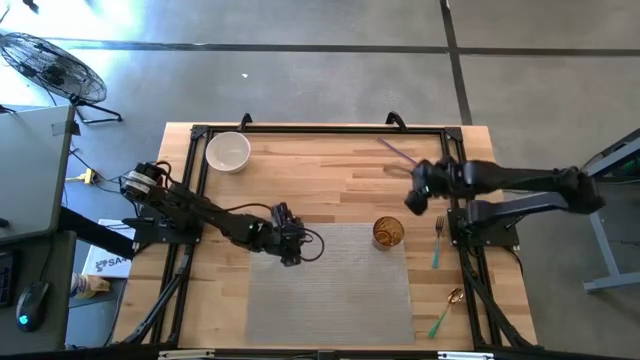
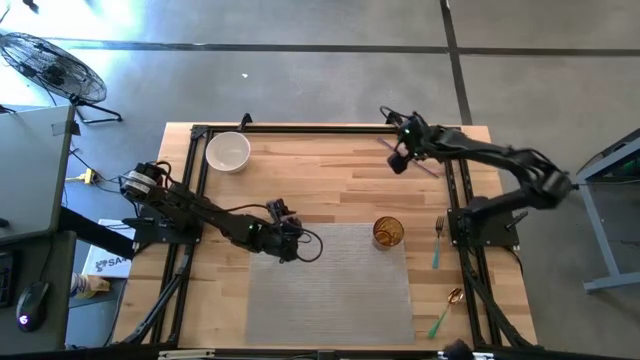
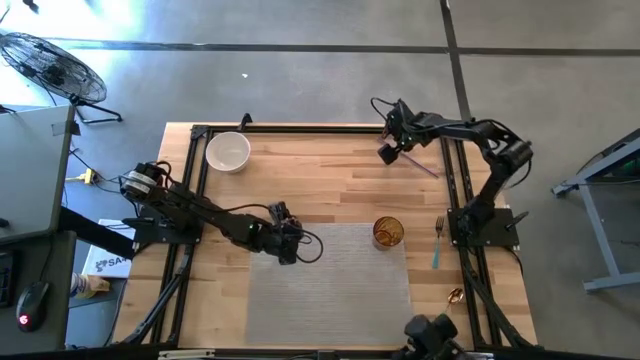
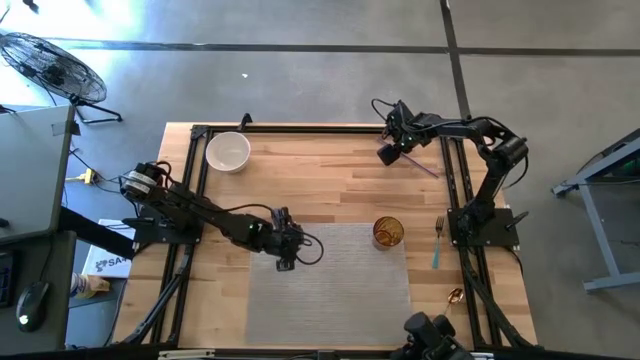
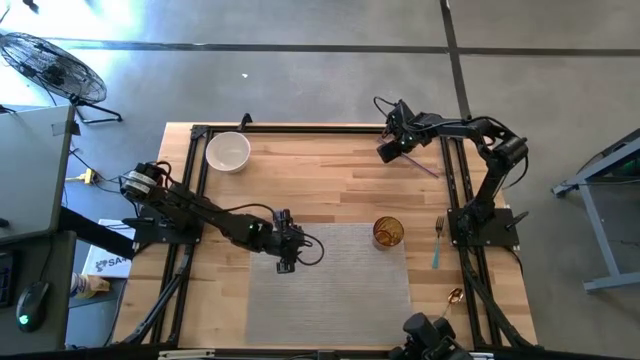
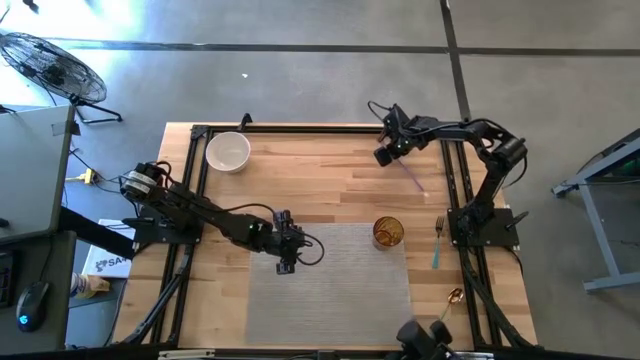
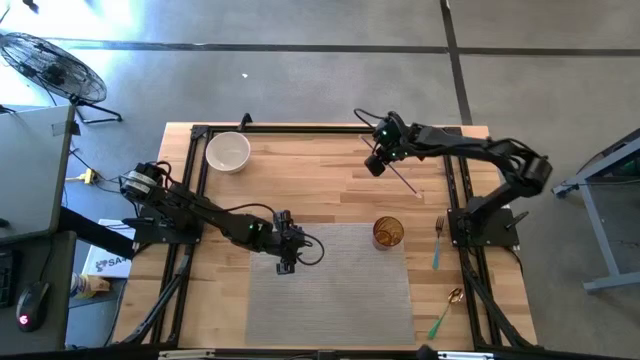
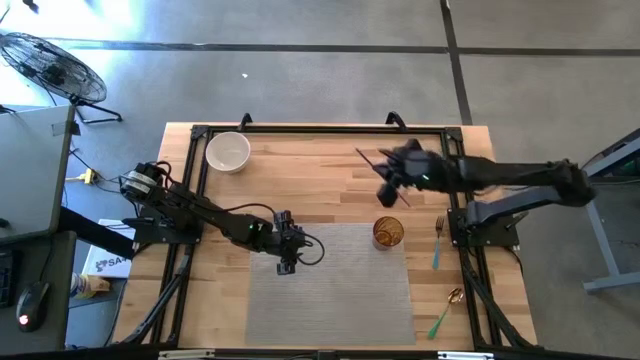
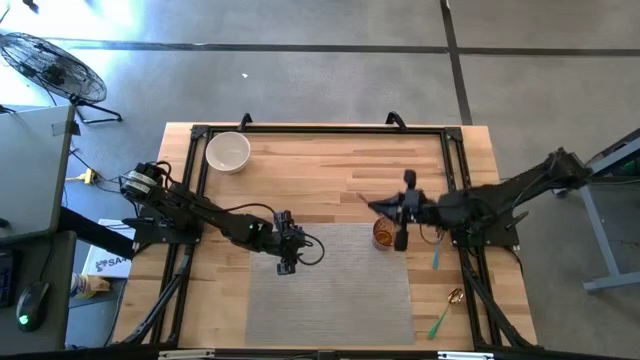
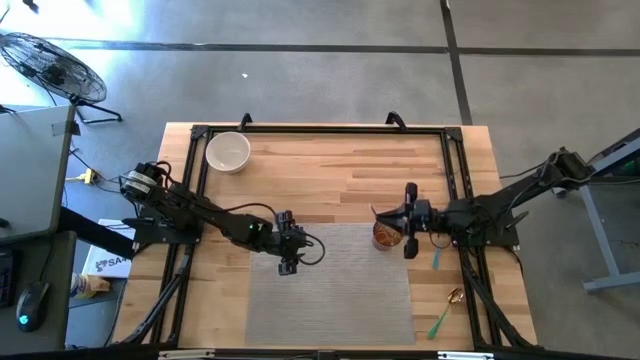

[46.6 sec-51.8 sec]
Task: Pick & Place Utensil
Put the blue straw into the brown cup

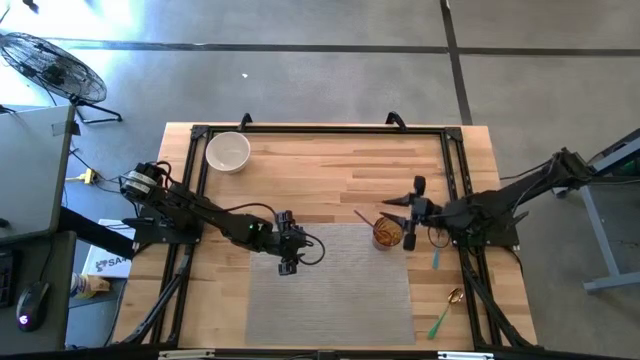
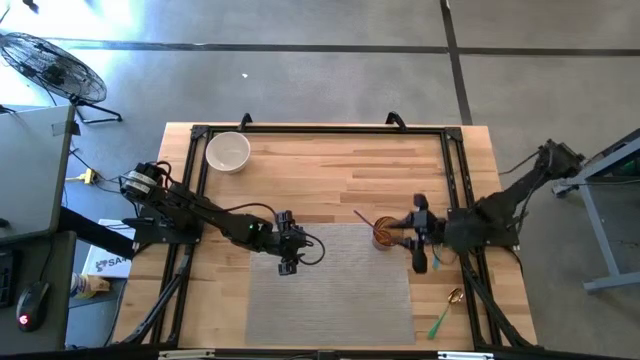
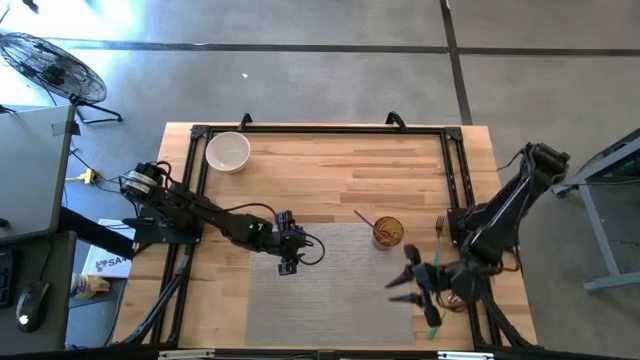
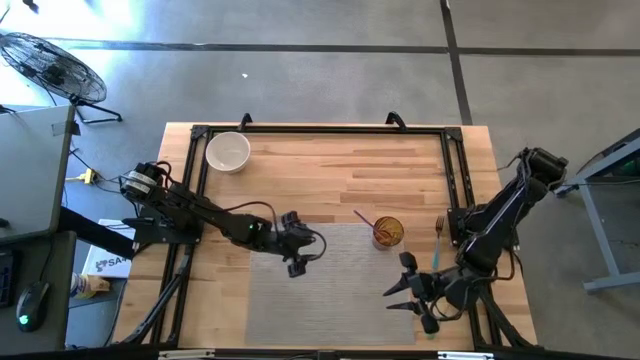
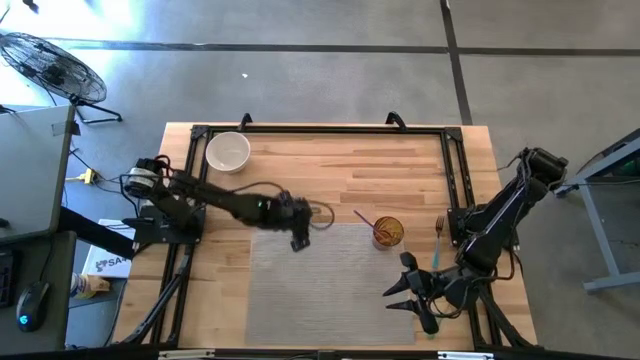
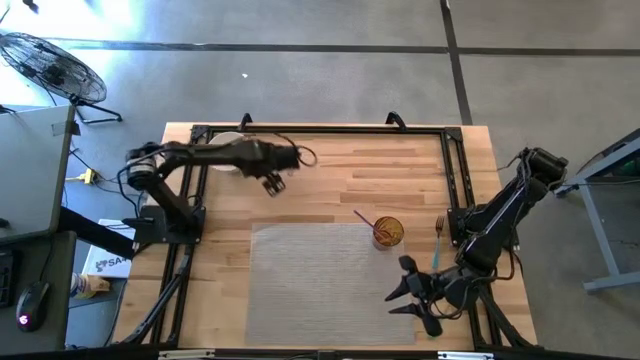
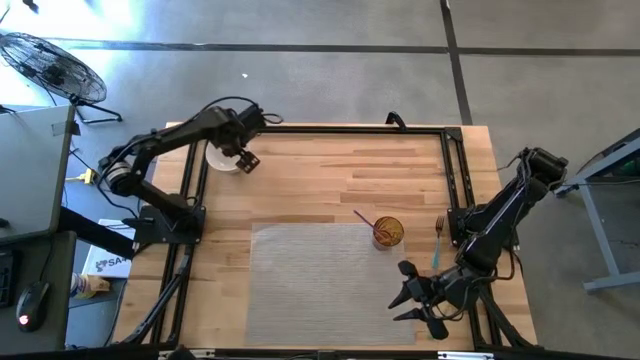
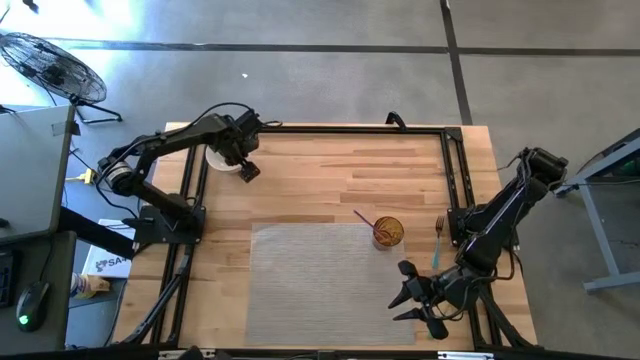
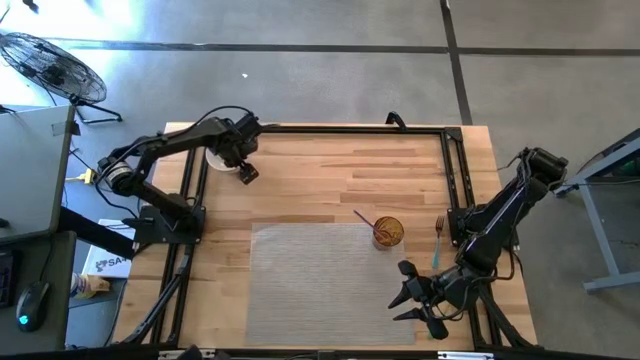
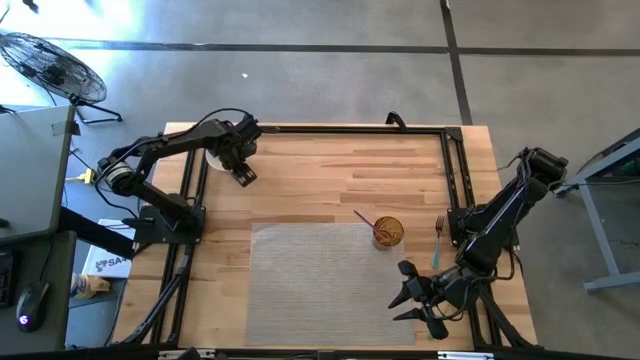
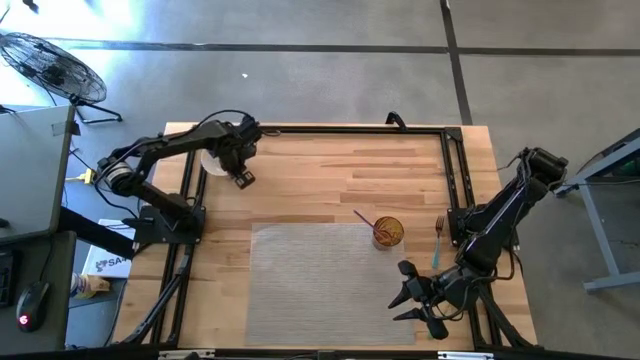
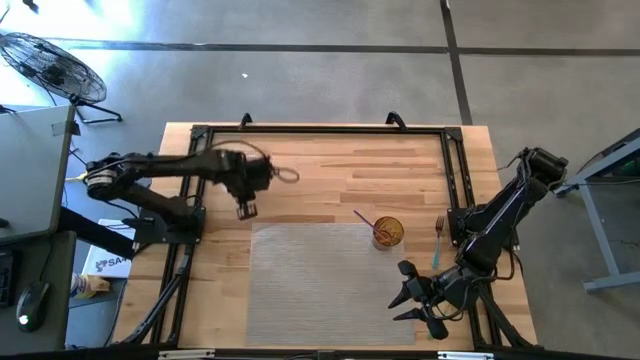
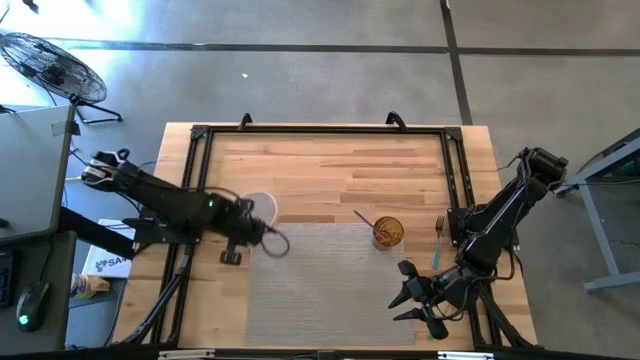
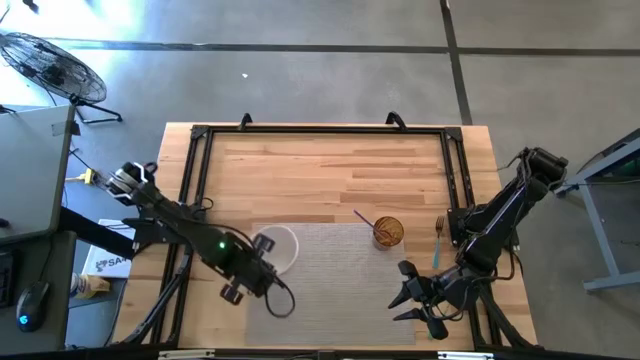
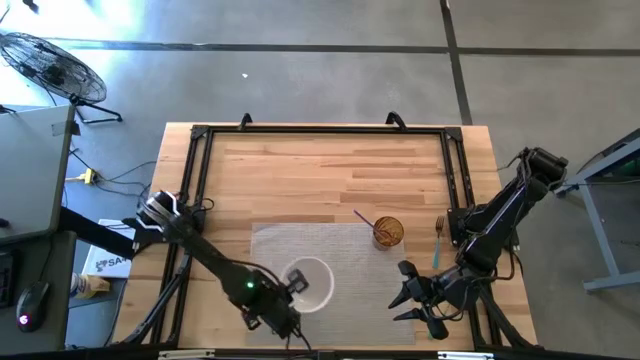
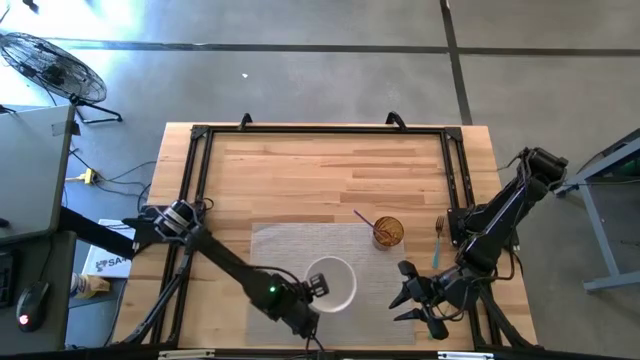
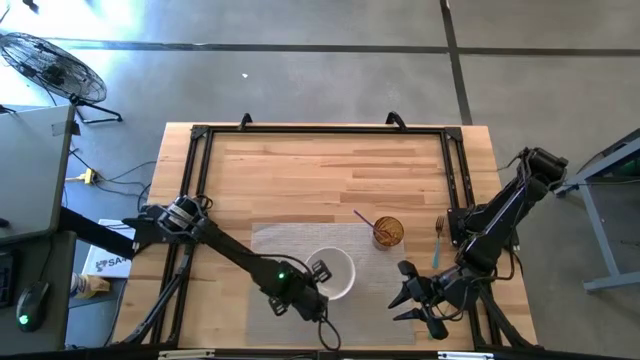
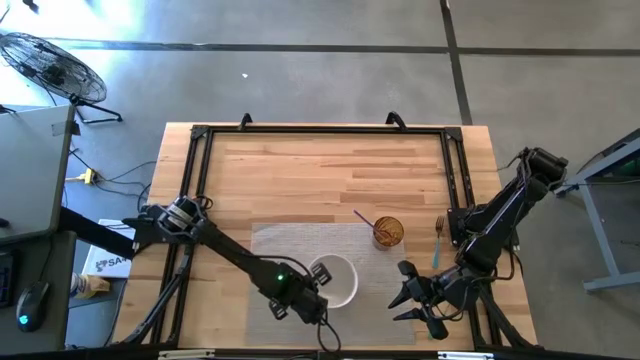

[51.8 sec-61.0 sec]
Put the white bowl on the gray mat to the bottom left of the brown cup

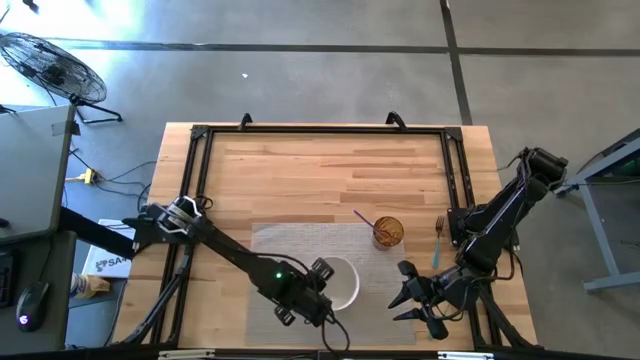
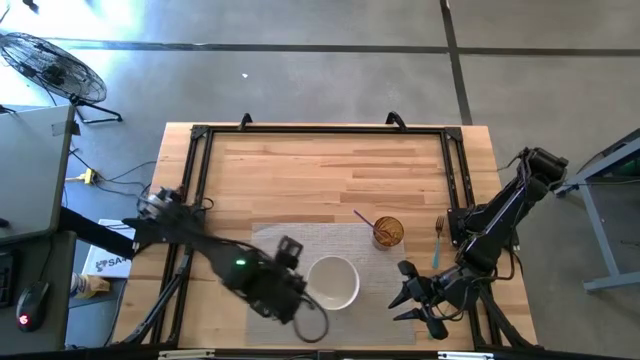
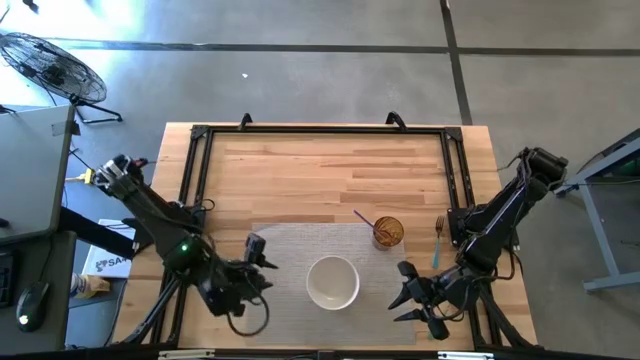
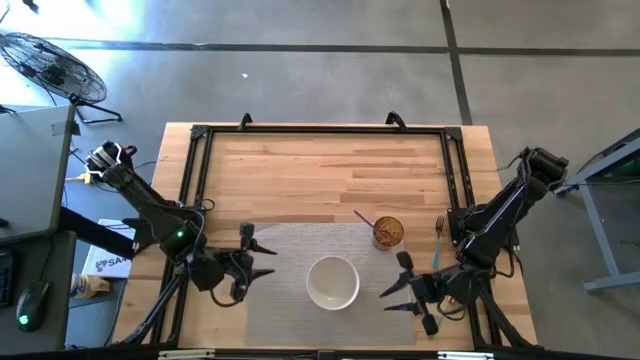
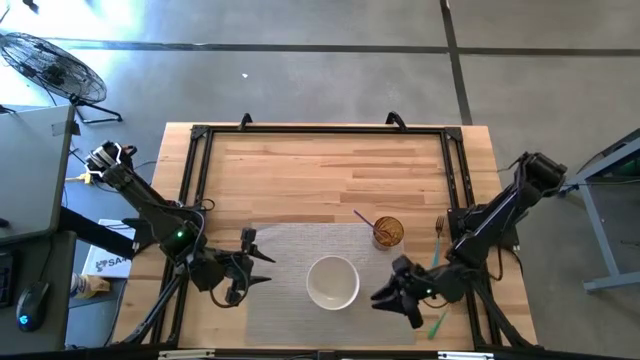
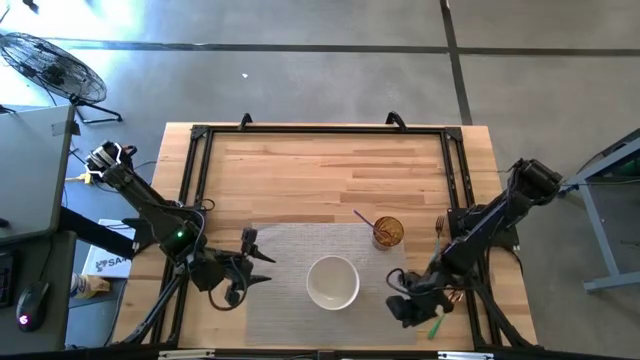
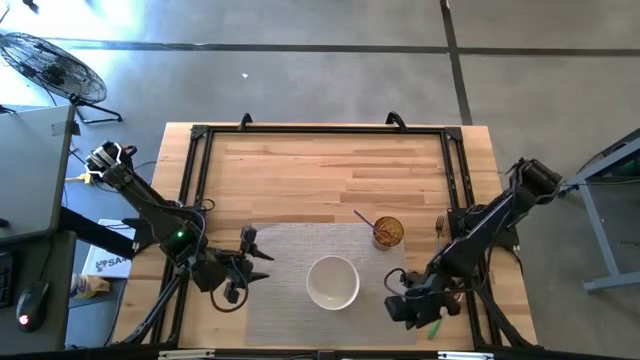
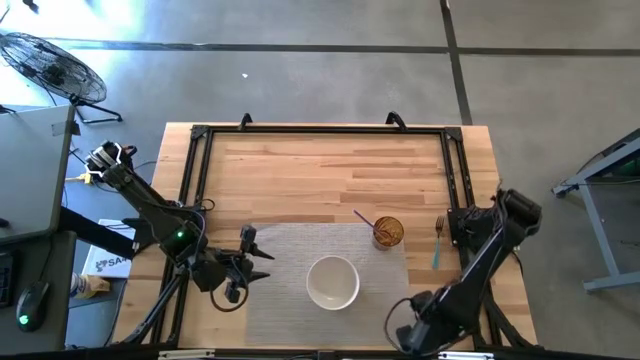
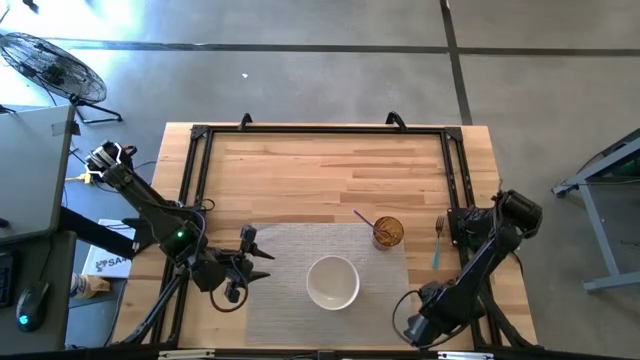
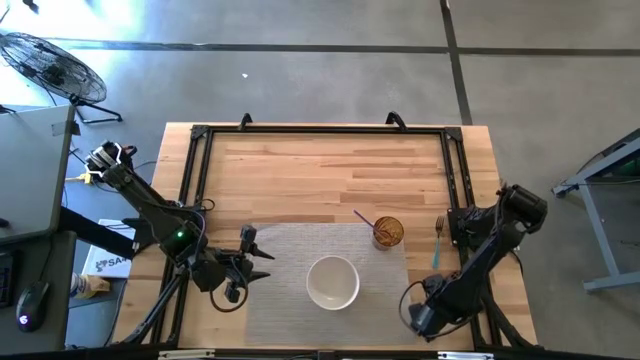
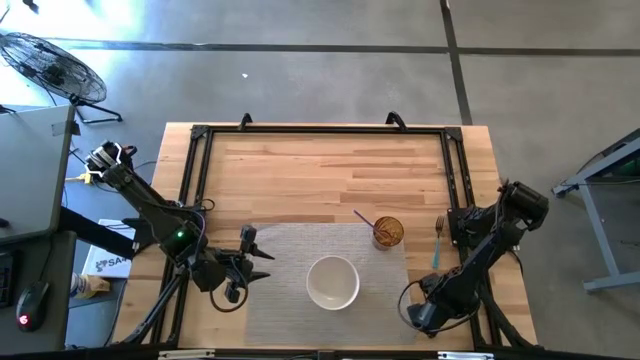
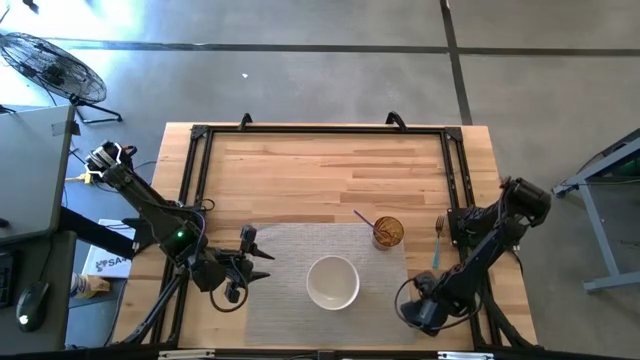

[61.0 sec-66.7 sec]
Put the green spoon into the white bowl

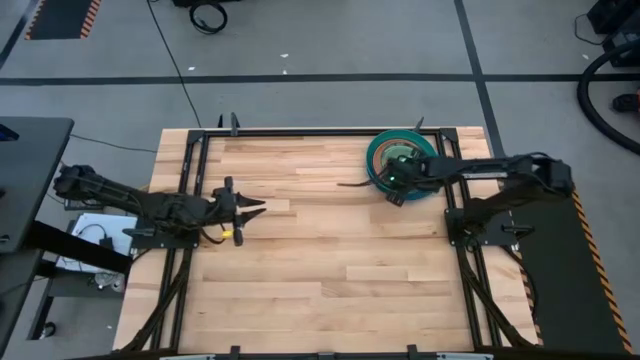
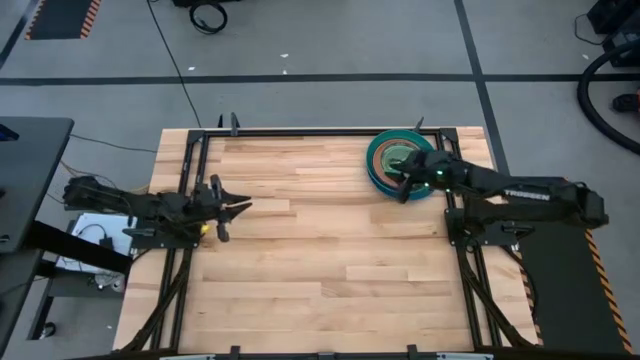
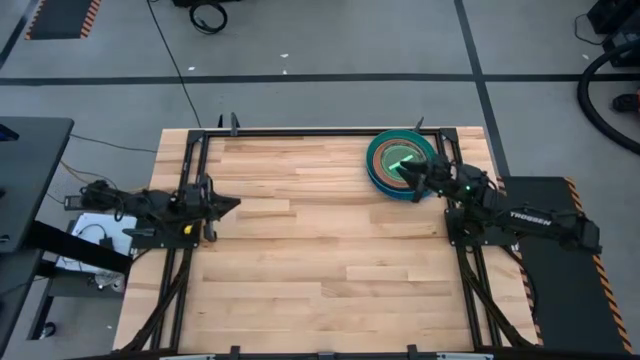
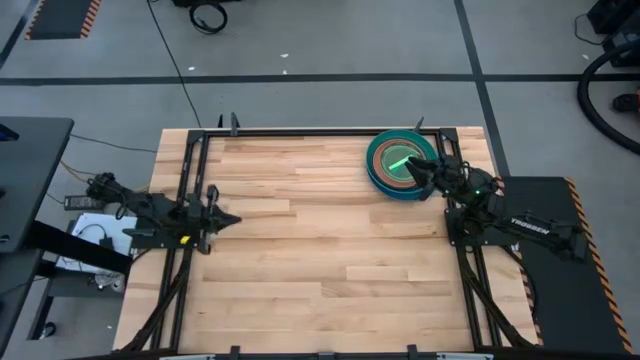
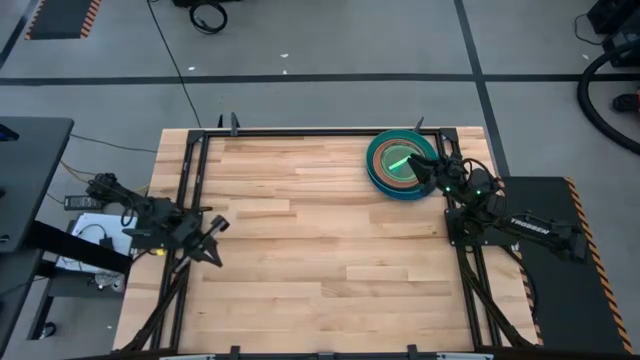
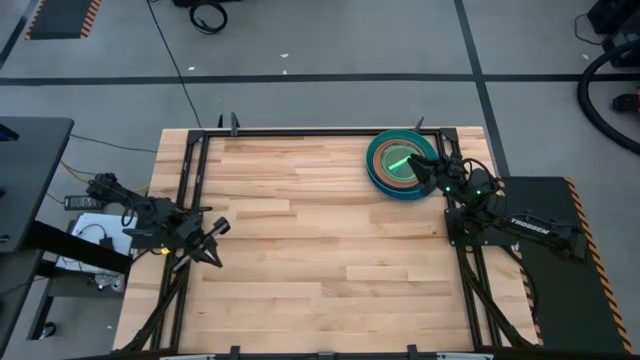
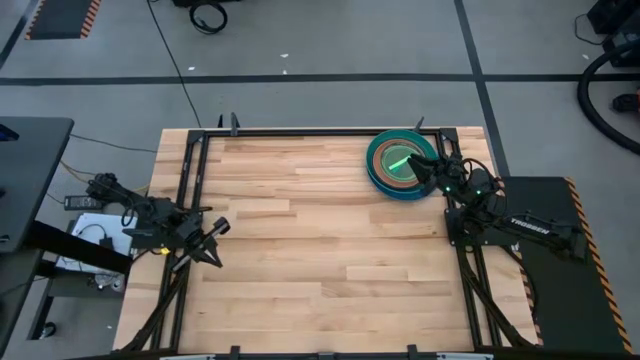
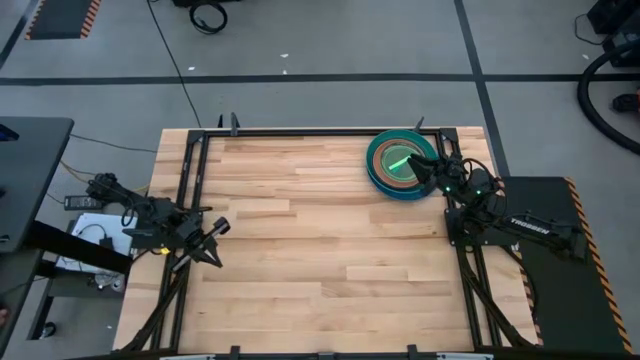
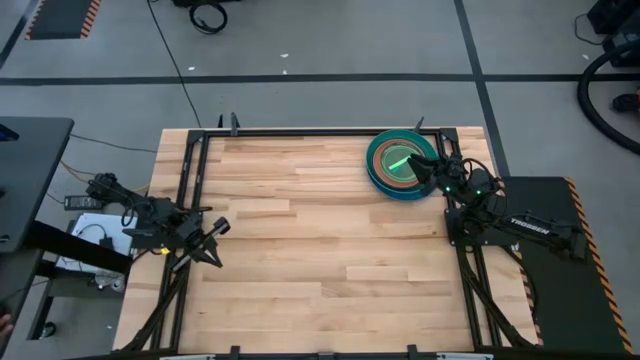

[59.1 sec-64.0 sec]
Task: Stack plastic plates
Return to Home Position
